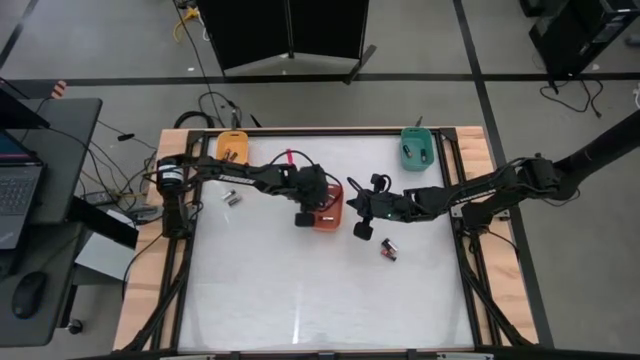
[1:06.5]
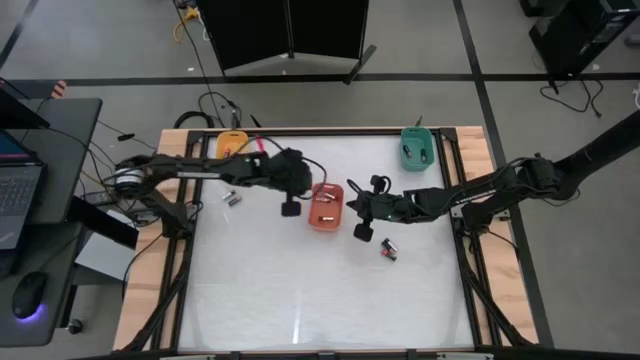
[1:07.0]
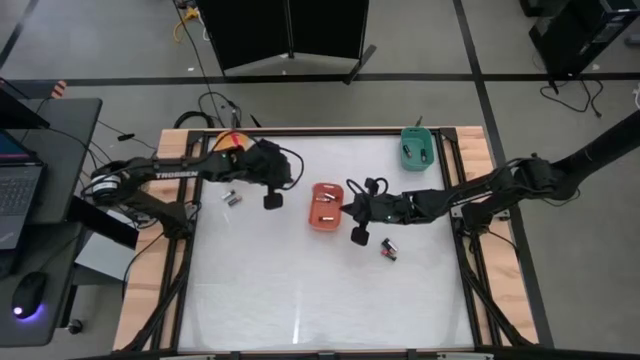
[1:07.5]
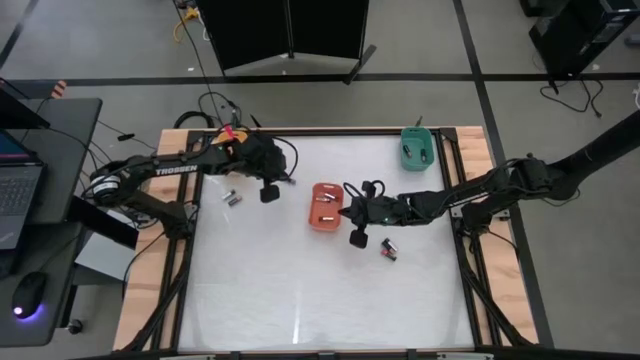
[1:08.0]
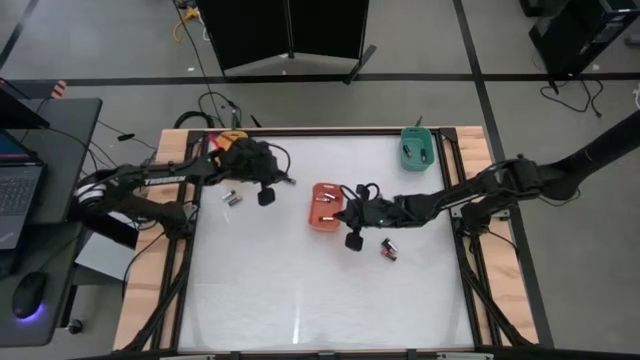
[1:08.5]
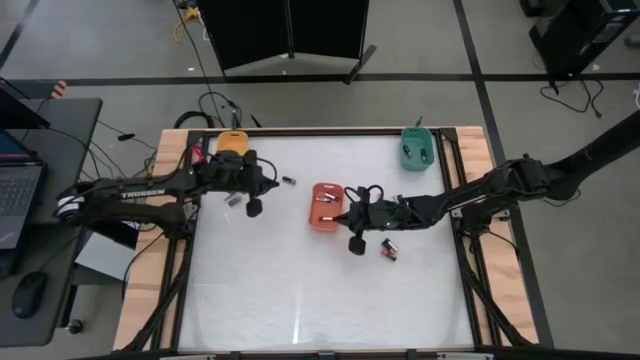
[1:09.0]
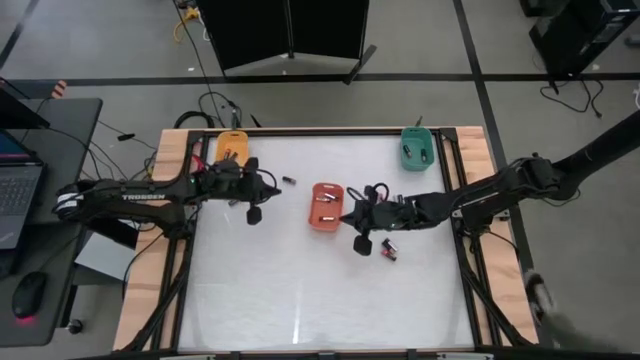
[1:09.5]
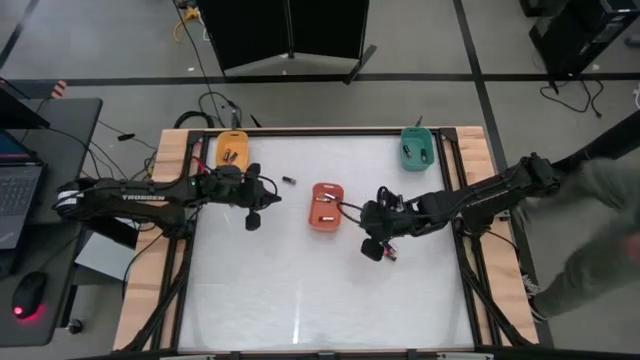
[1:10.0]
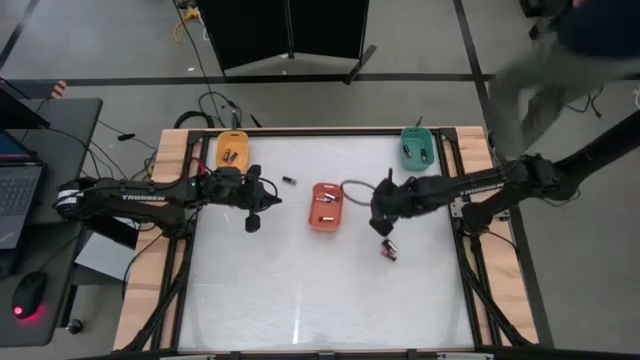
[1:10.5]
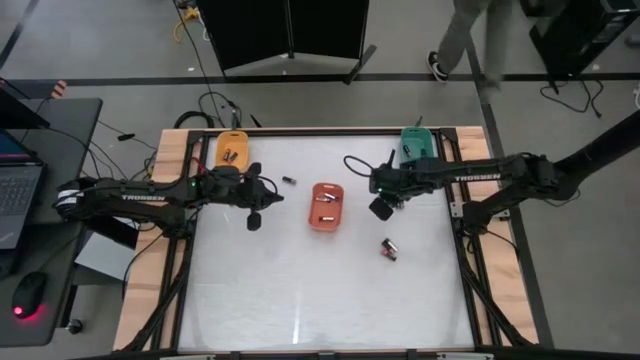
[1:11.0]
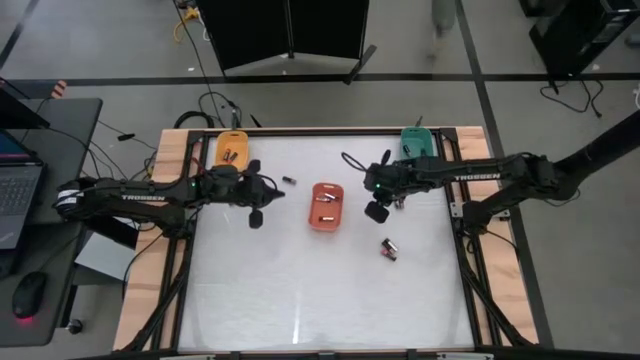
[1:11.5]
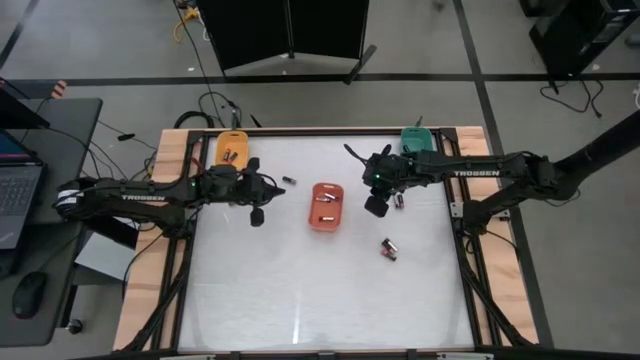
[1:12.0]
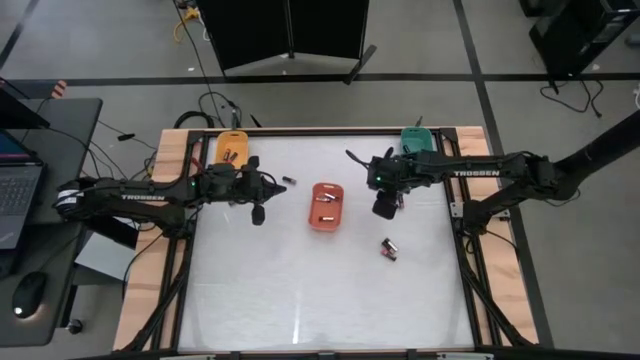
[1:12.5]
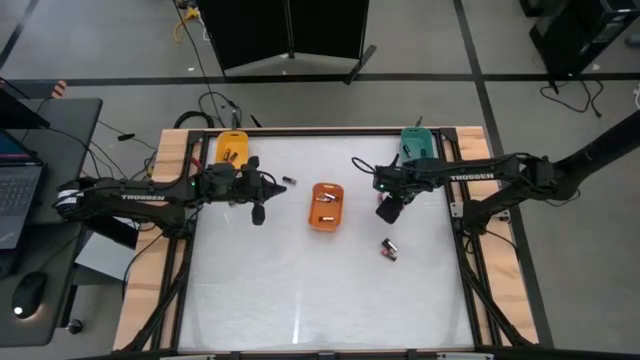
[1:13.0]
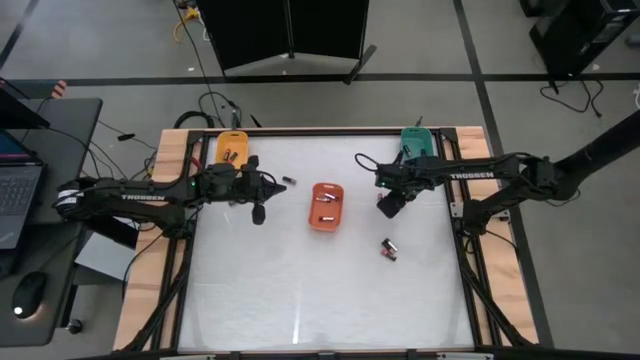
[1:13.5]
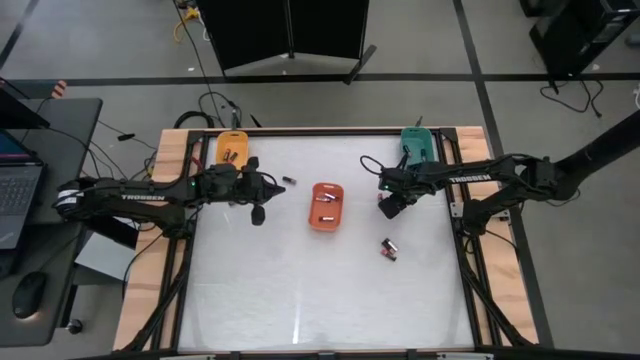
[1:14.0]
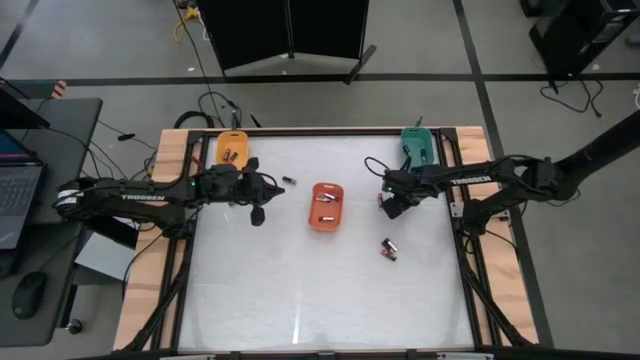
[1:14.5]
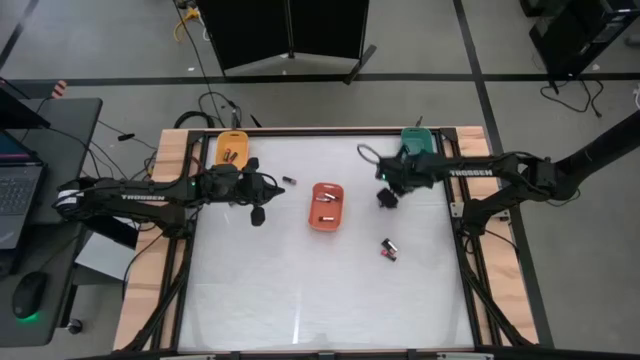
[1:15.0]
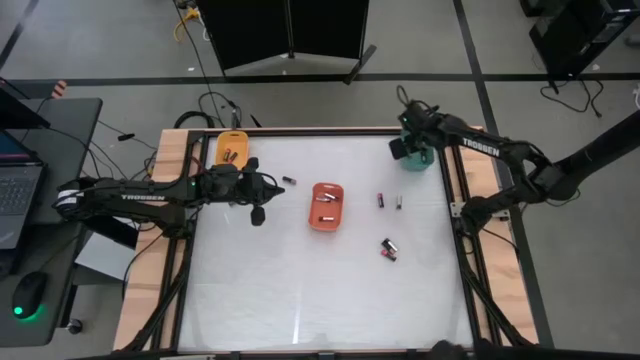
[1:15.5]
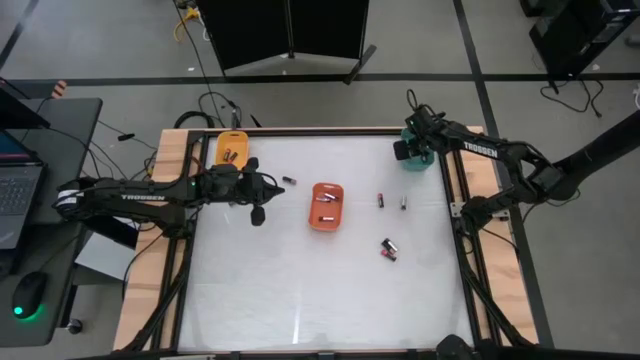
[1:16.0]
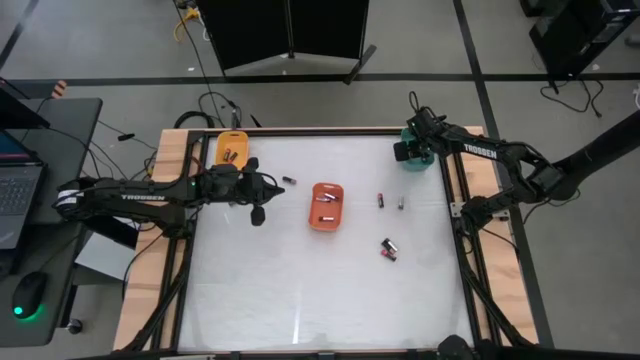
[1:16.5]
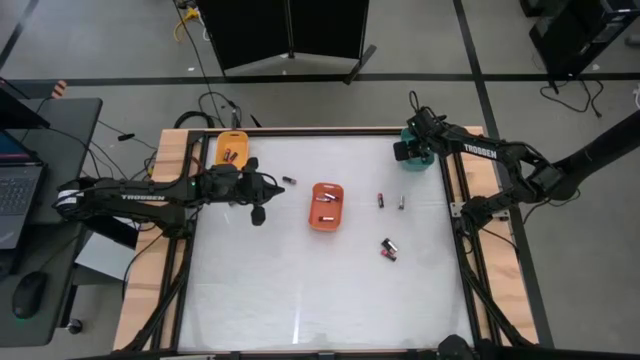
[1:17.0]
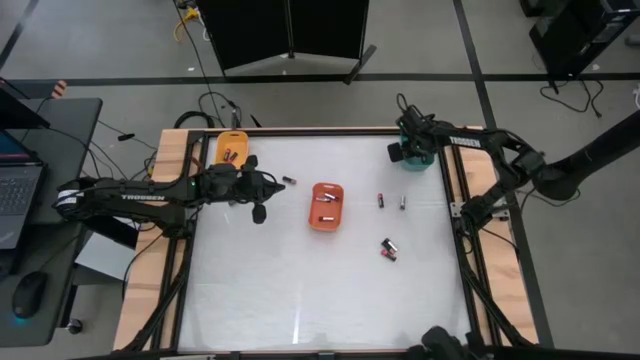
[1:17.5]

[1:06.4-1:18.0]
Task: Sort batteries
Put the black-brown battery into the green bin

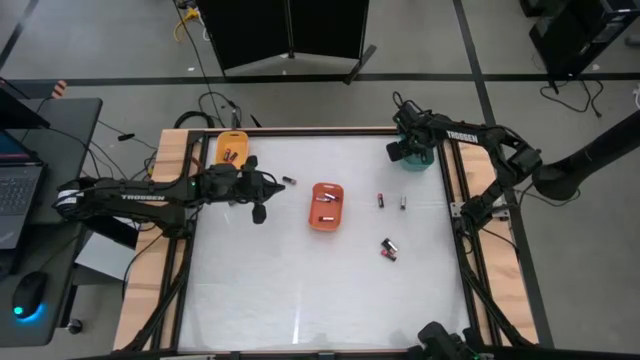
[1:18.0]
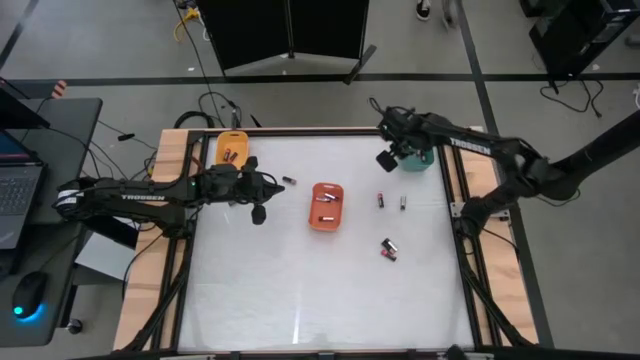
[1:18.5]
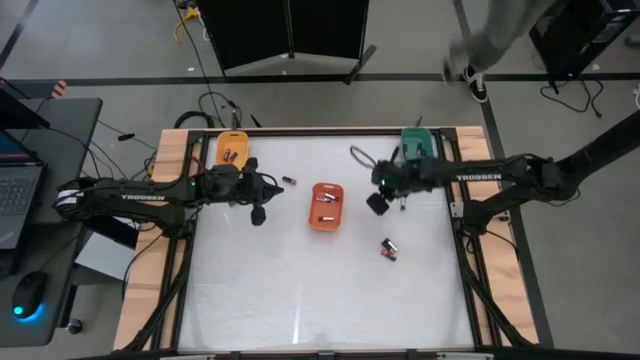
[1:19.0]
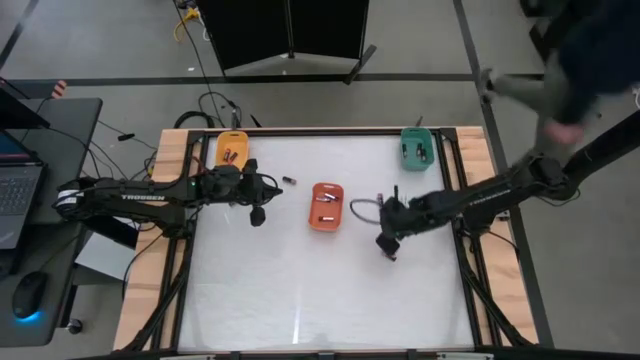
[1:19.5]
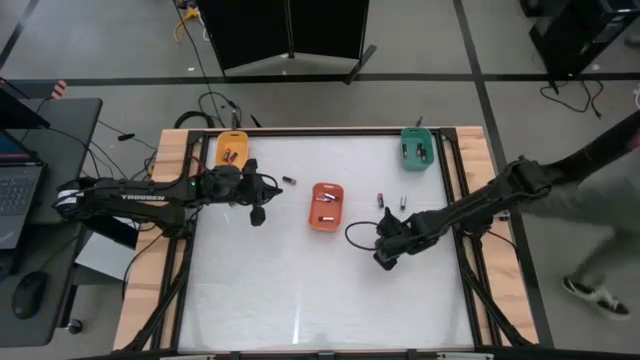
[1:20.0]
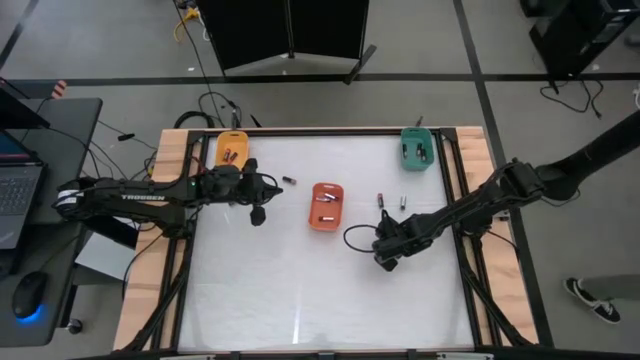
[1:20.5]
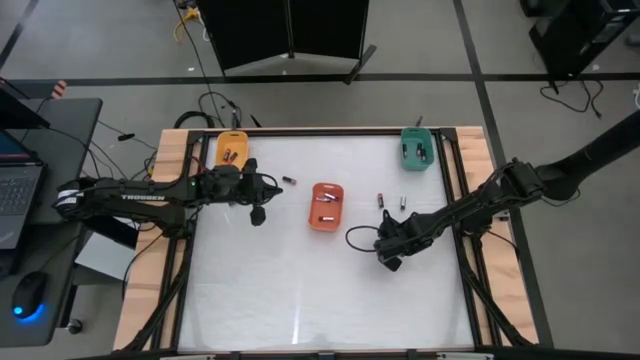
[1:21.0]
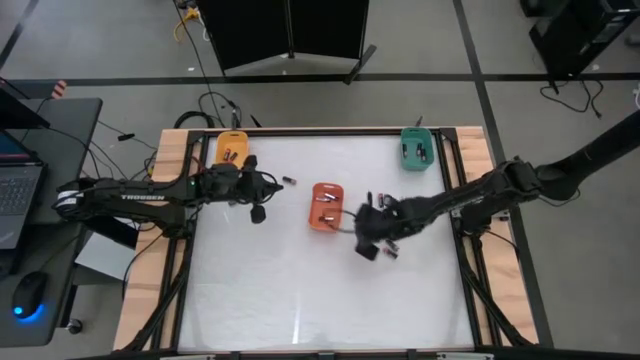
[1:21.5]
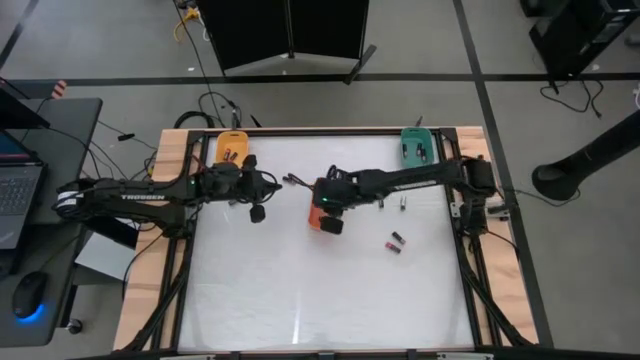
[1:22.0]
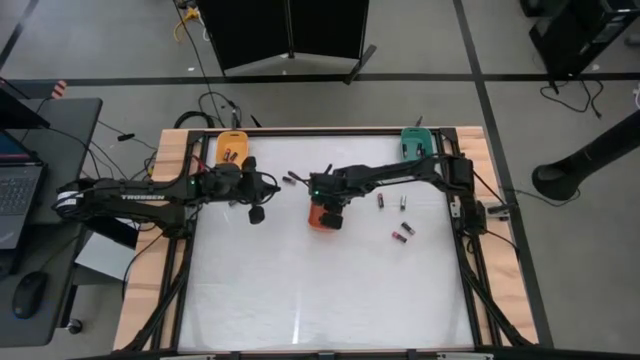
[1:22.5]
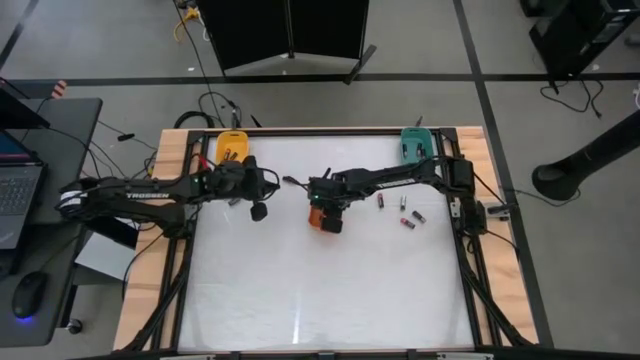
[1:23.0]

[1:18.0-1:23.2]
Put the silver battery into the orange bin

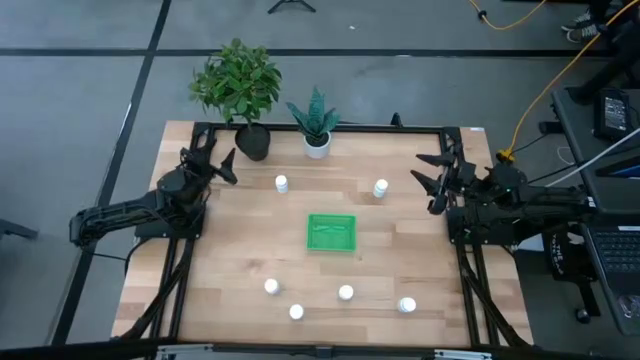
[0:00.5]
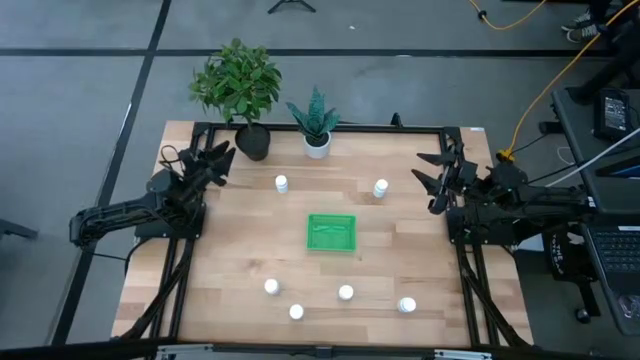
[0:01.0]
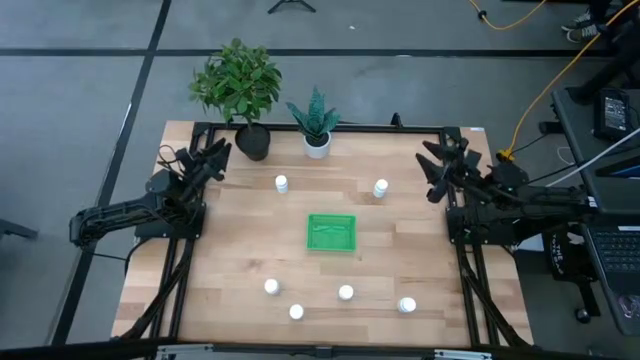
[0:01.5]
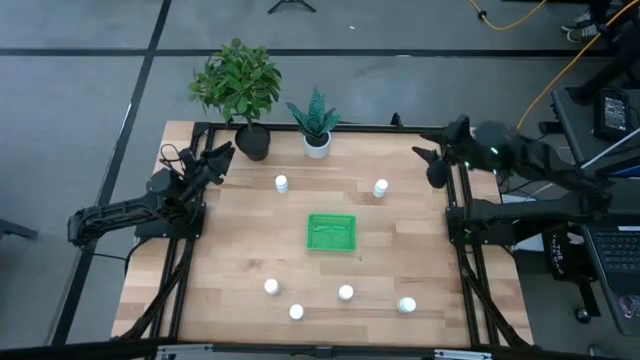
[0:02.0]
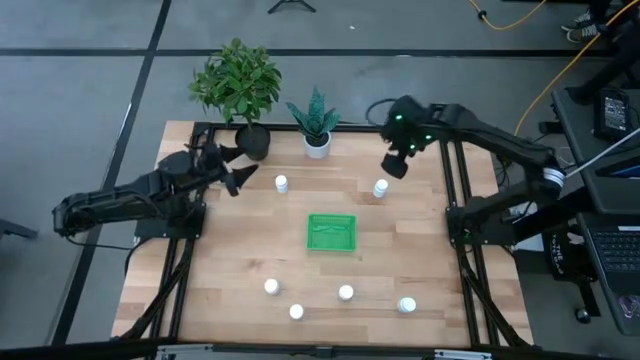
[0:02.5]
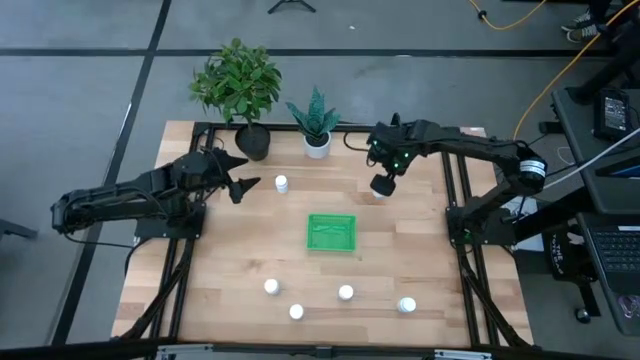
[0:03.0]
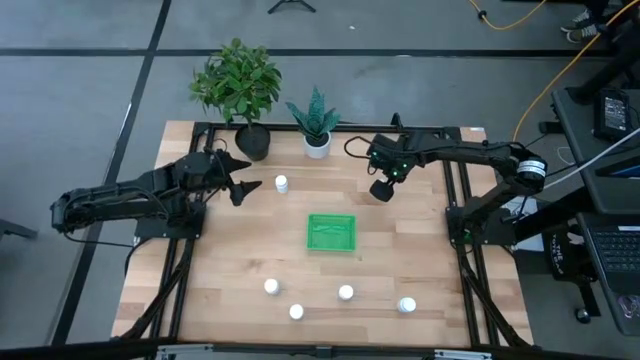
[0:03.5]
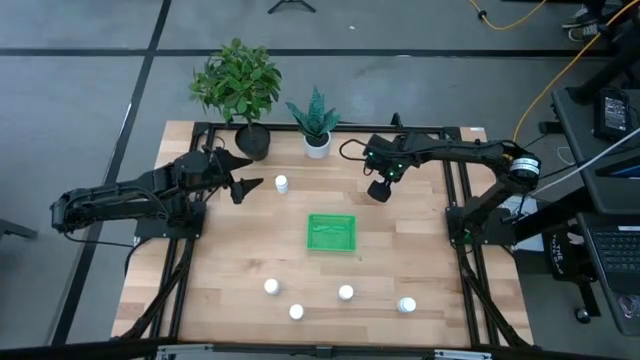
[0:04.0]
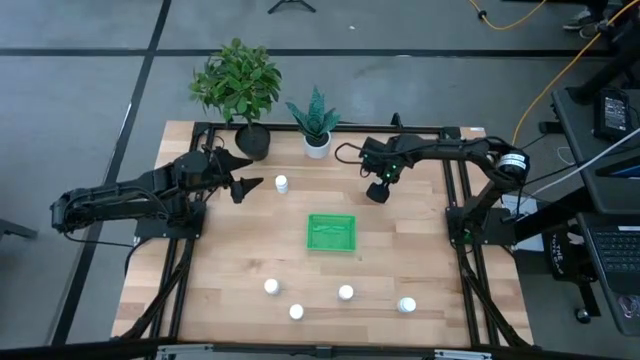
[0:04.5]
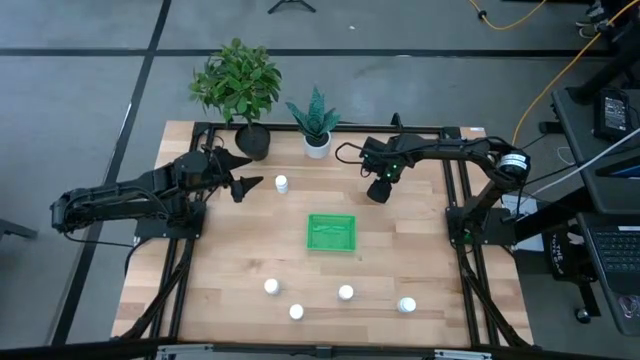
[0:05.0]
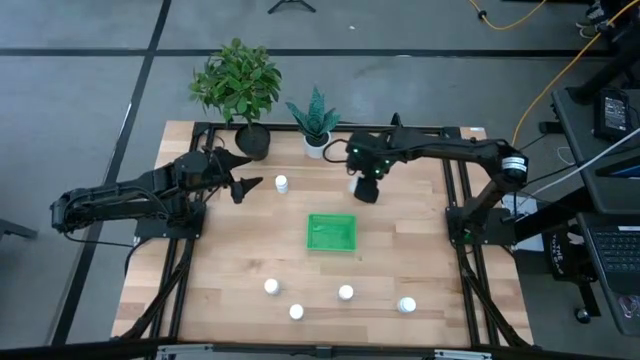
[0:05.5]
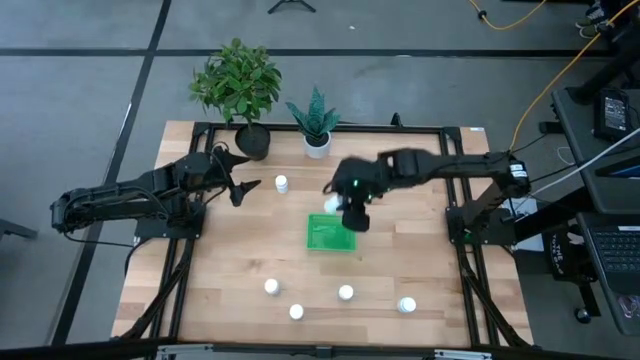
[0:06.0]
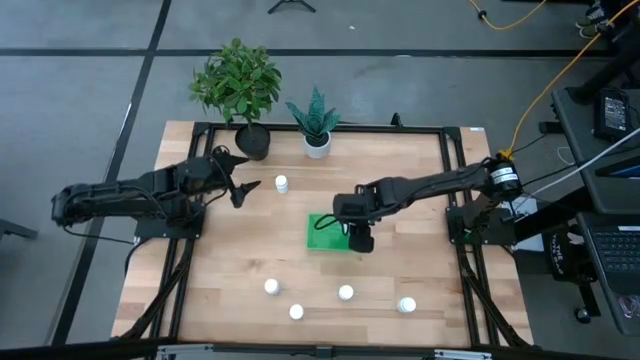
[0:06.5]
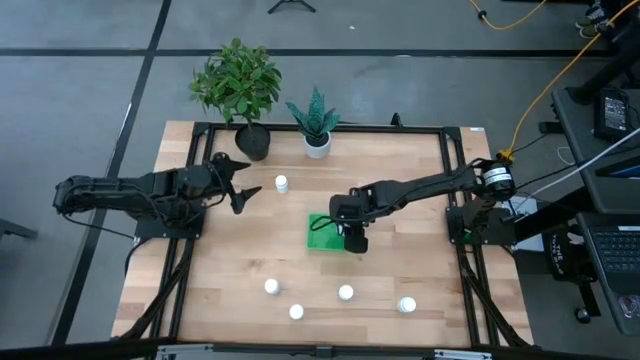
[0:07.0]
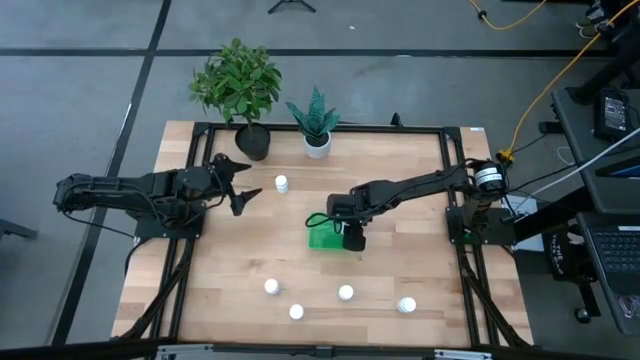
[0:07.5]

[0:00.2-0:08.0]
Task: Pick and place pill bottles into a basket
Put the white pill bottle into the green basket
